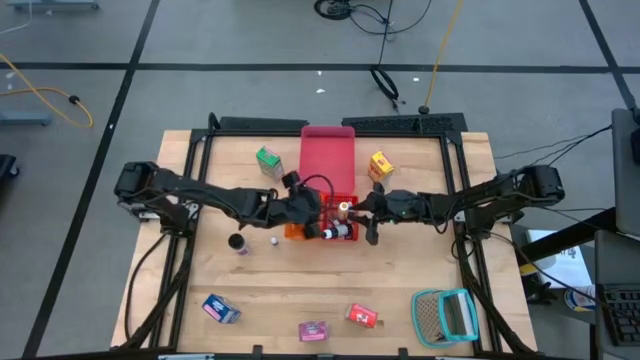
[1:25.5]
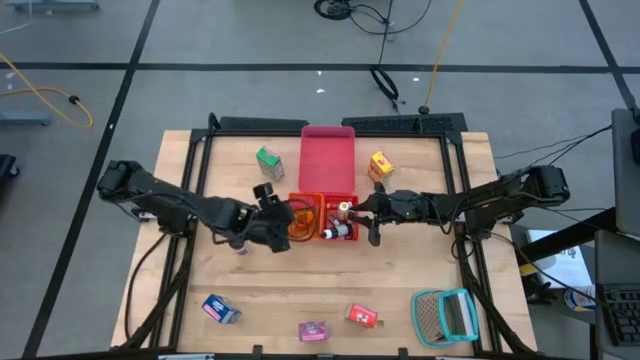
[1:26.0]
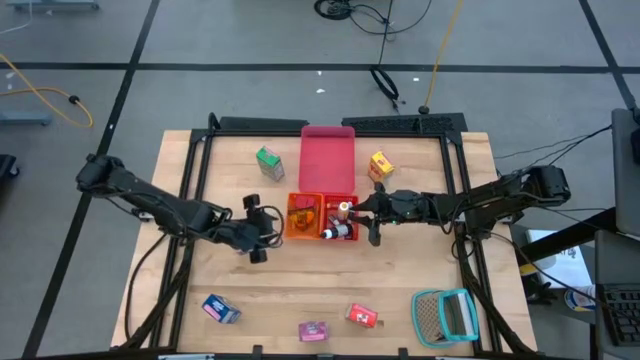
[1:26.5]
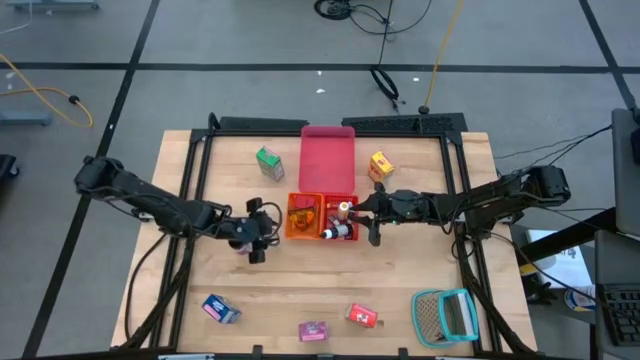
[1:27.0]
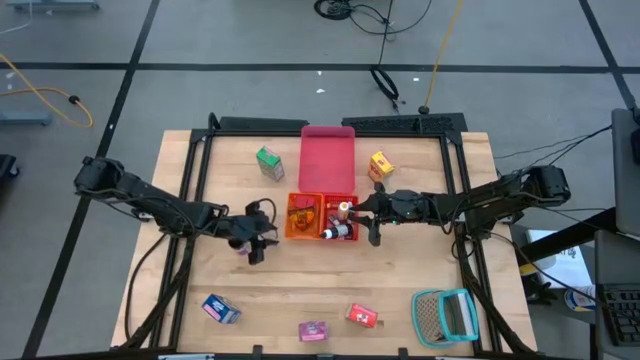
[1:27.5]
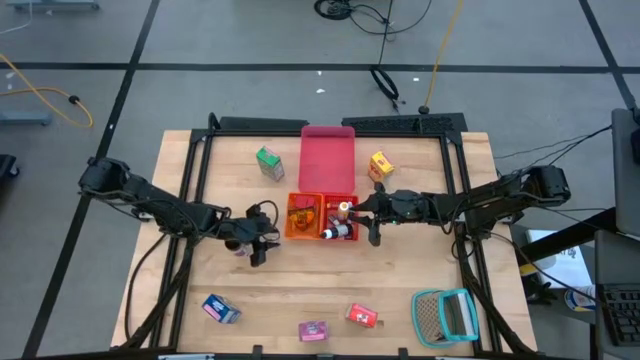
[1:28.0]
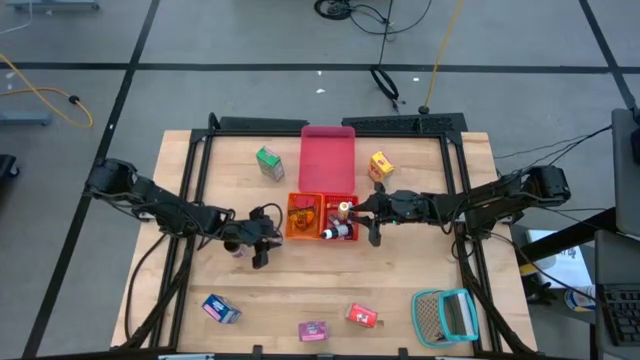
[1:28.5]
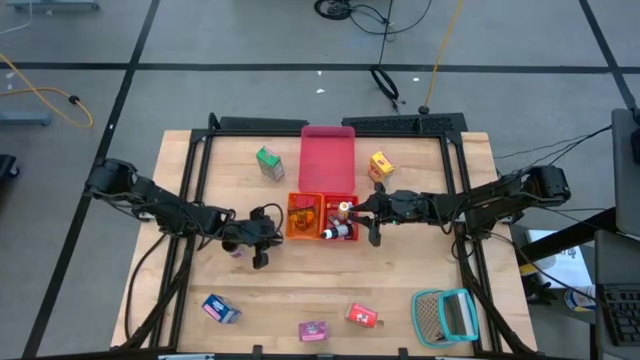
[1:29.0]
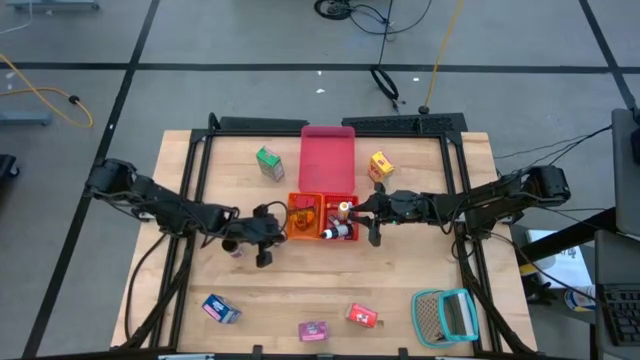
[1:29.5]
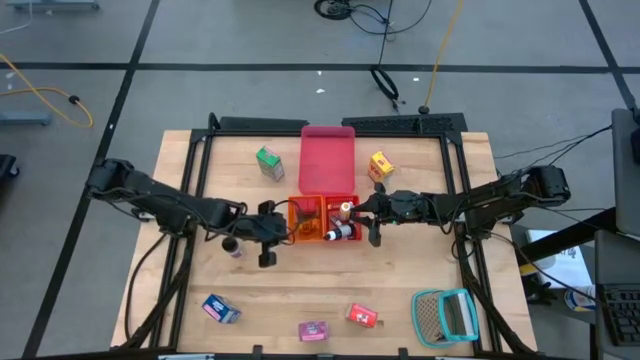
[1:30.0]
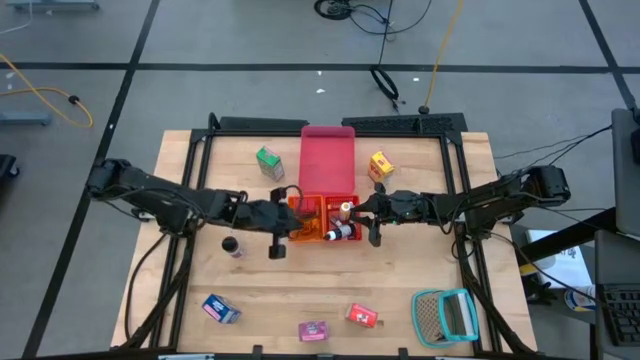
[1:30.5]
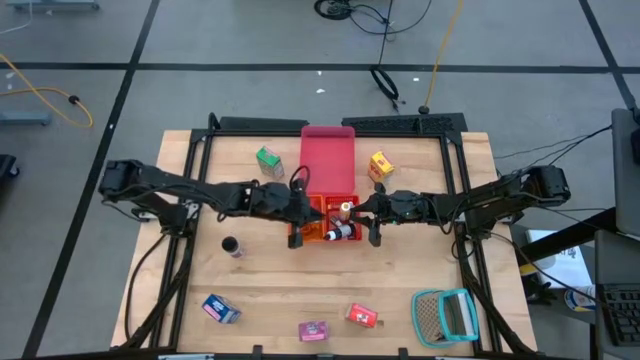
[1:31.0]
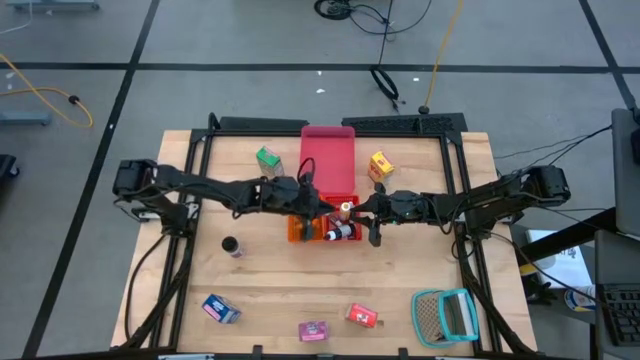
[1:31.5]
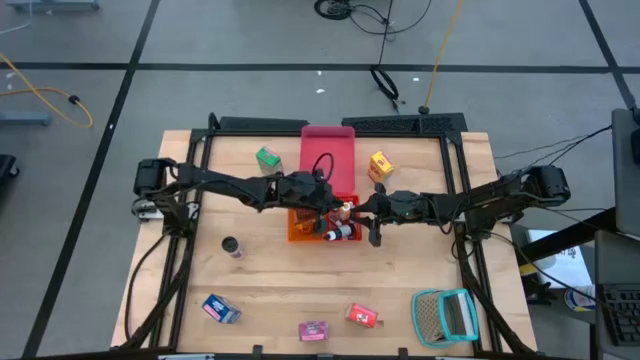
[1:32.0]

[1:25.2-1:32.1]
Task: Pick & Place Kitchen Items
Put the small brown food coloring bottle into the red basket

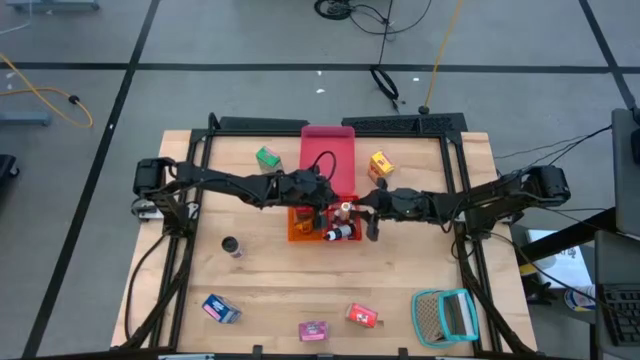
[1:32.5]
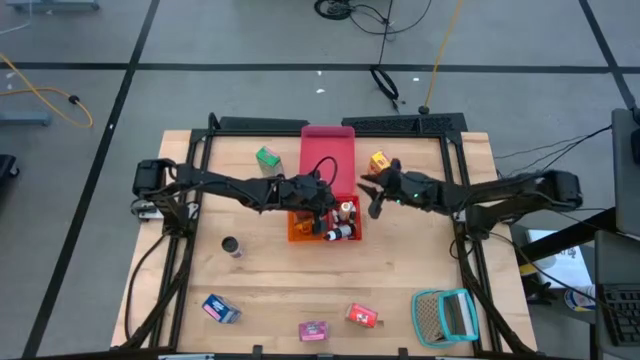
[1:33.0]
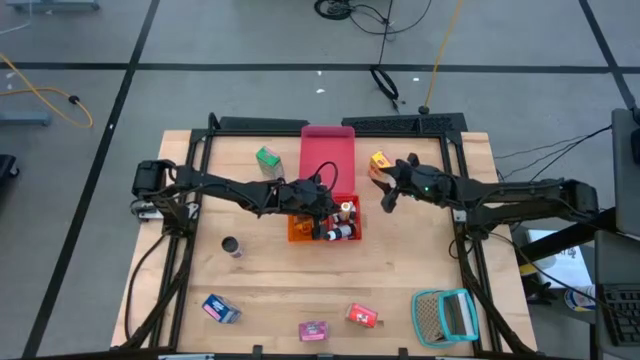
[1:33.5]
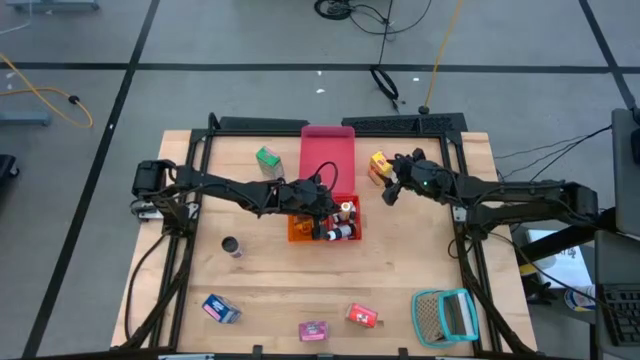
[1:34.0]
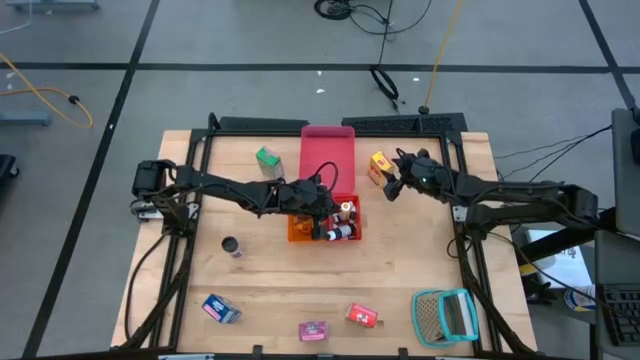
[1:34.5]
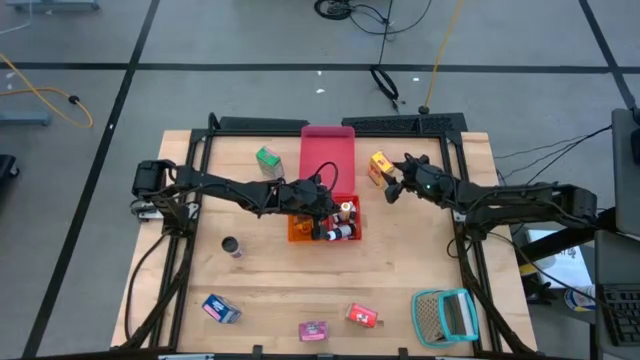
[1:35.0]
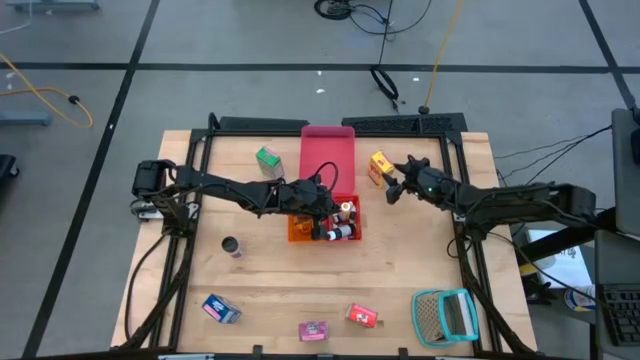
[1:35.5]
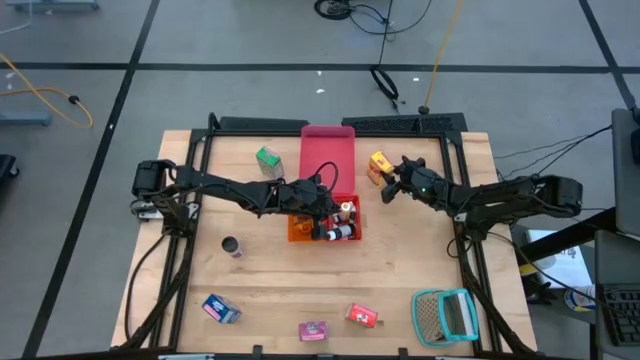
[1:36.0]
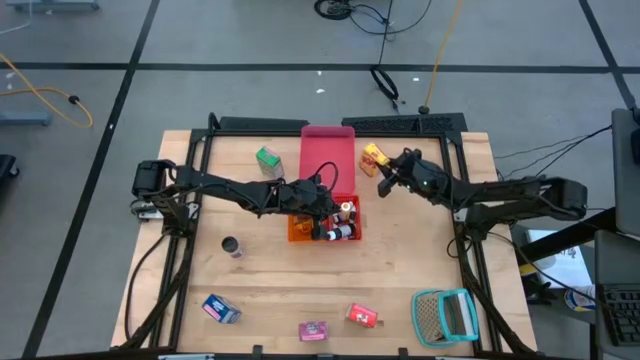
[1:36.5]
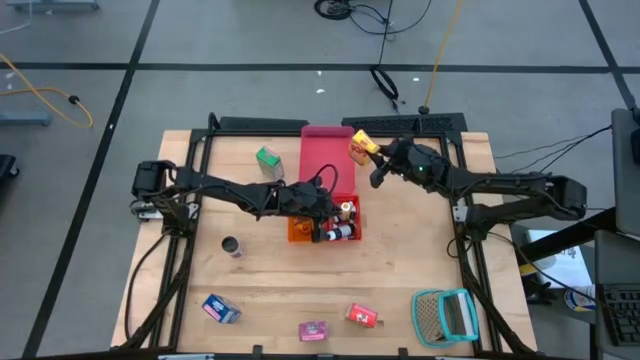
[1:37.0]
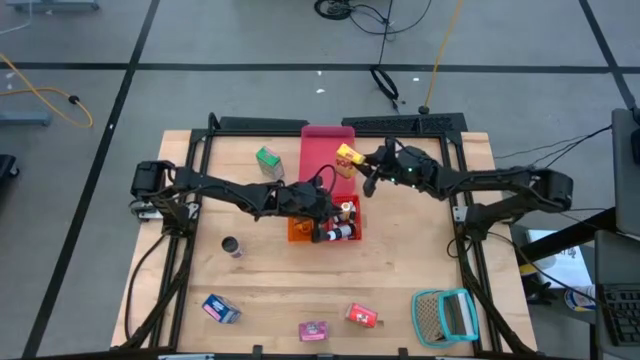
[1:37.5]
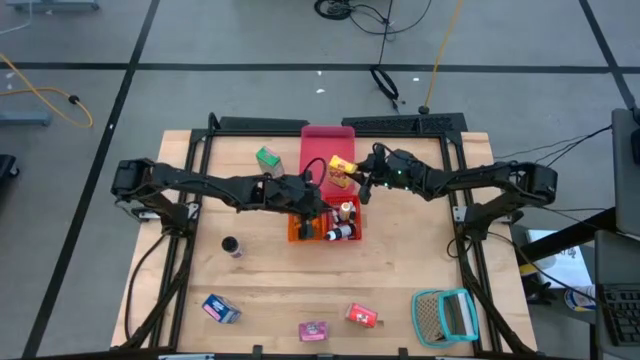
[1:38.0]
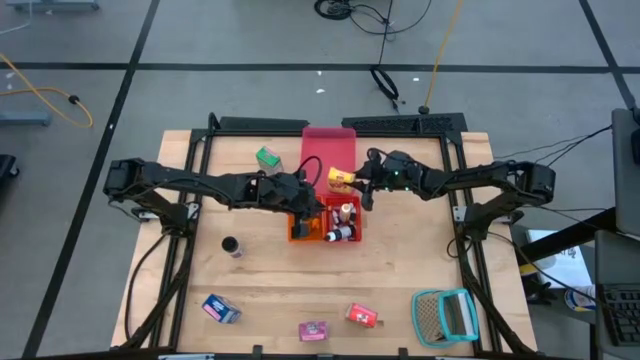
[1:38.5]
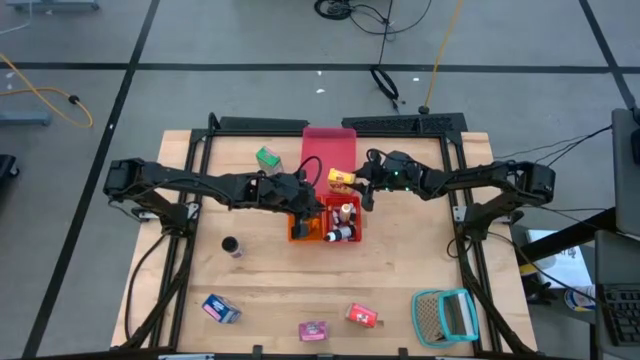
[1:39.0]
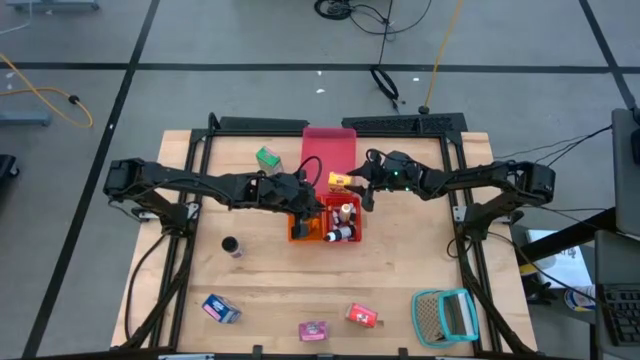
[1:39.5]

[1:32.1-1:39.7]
Put the yellow cereal box into the pink bin

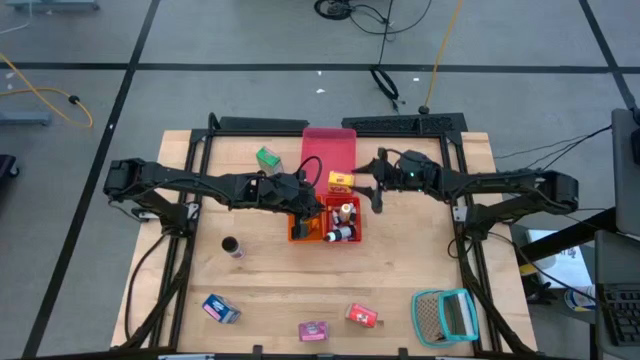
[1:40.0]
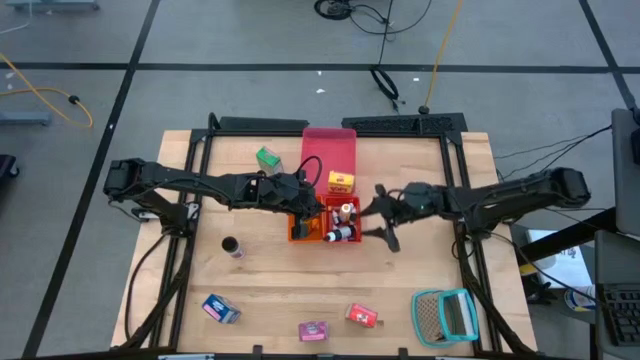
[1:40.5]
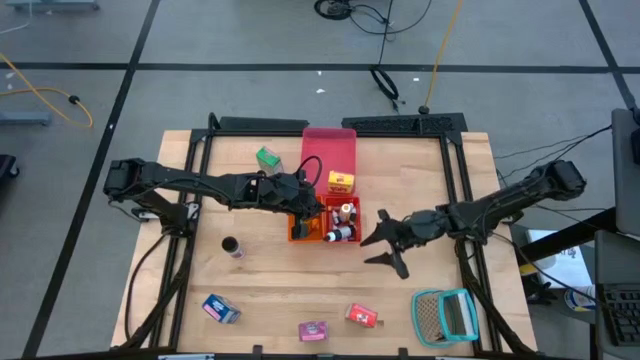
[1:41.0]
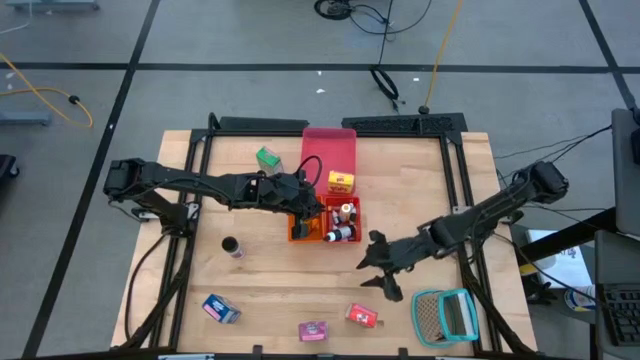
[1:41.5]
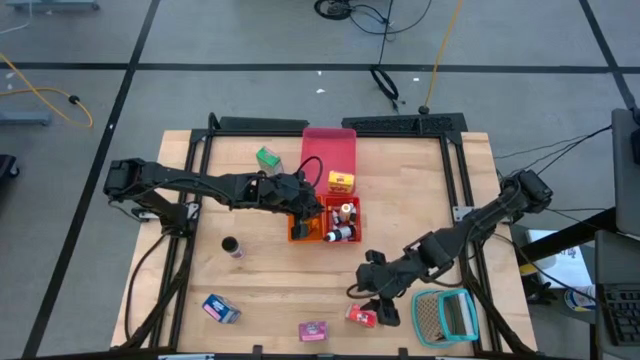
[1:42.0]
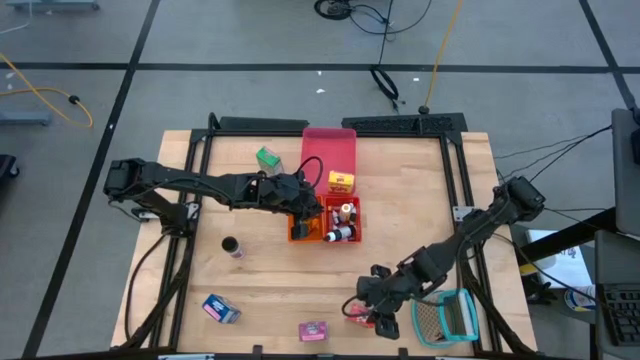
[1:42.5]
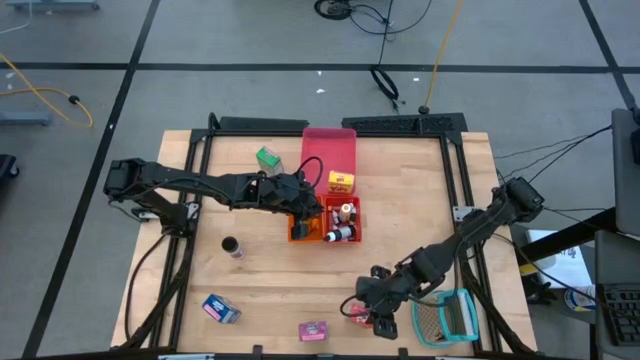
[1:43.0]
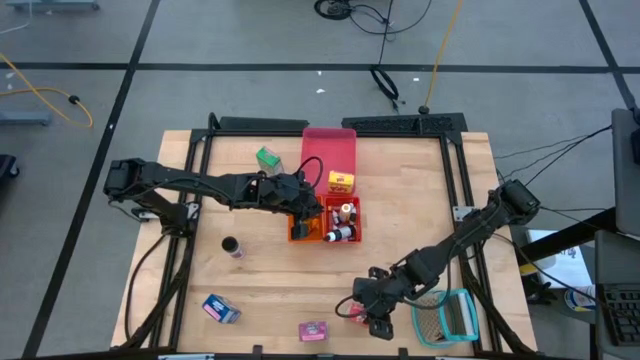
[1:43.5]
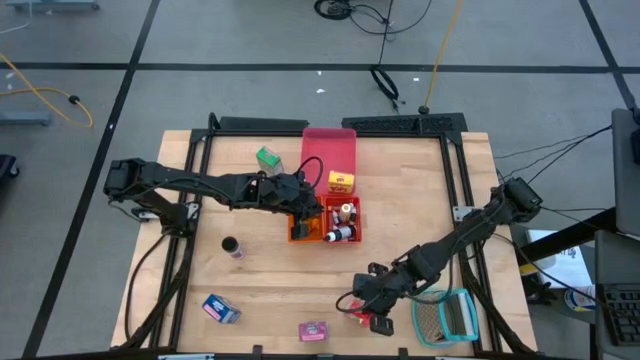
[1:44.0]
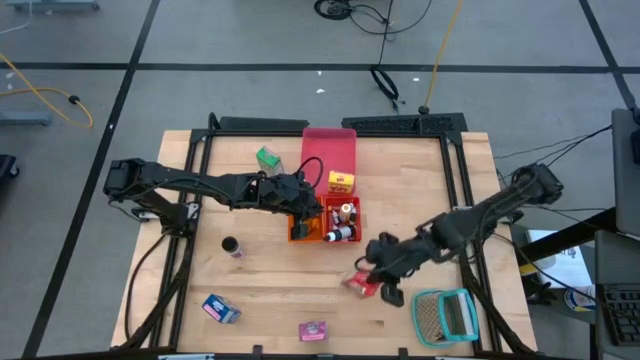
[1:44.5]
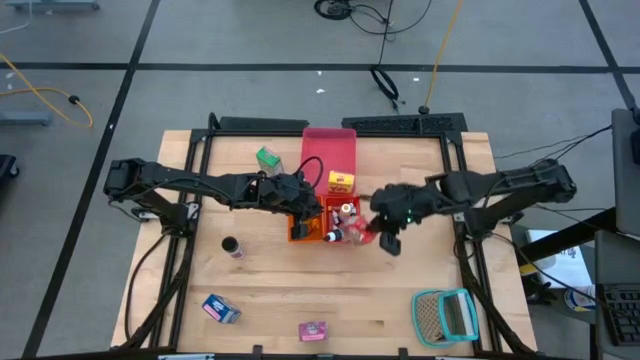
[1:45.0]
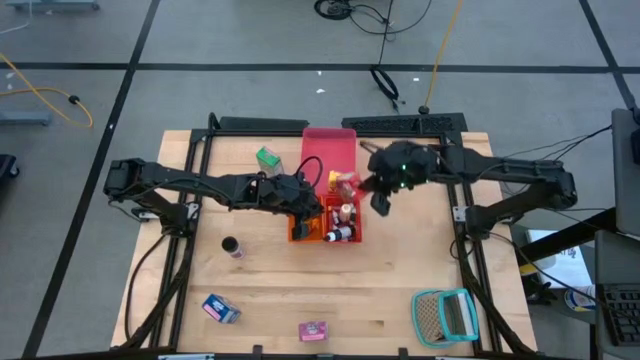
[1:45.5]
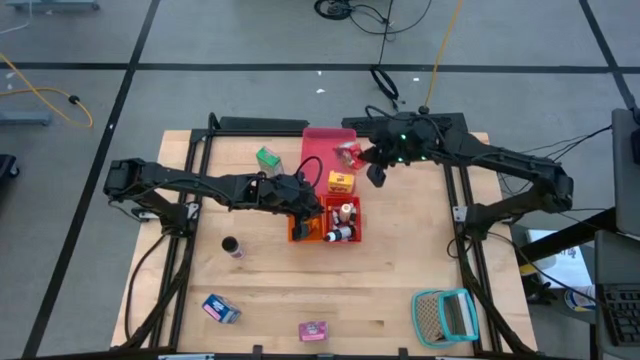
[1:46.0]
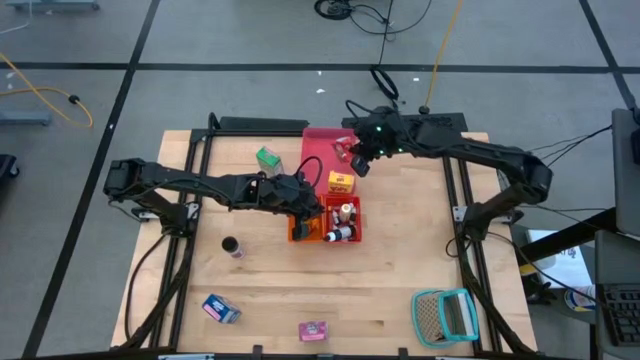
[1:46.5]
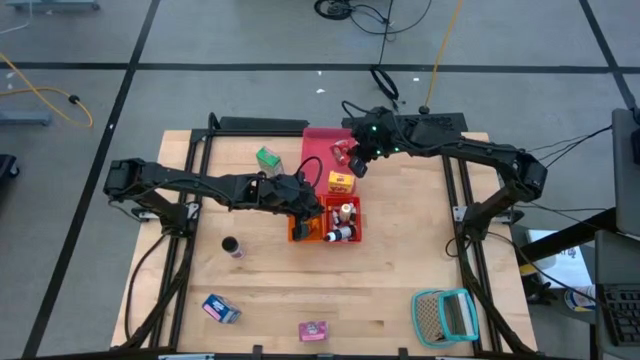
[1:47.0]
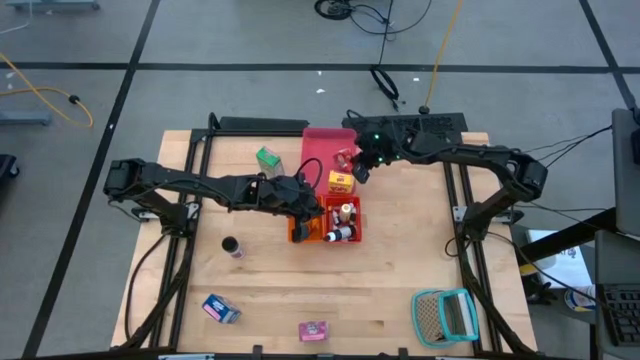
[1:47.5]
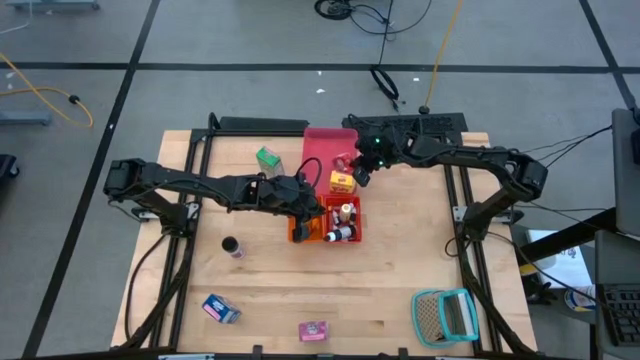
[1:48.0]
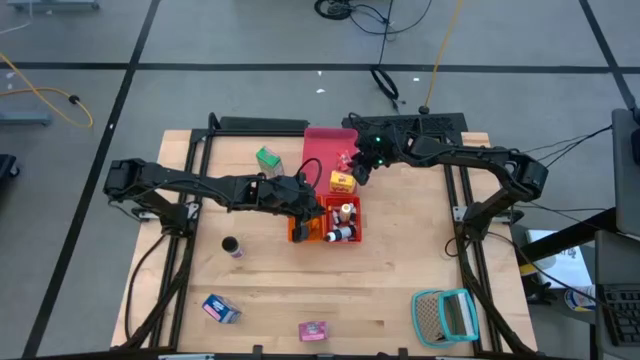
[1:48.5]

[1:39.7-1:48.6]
Put the red cereal box into the pink bin
